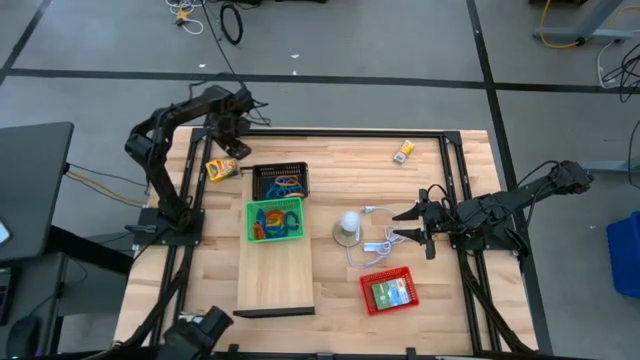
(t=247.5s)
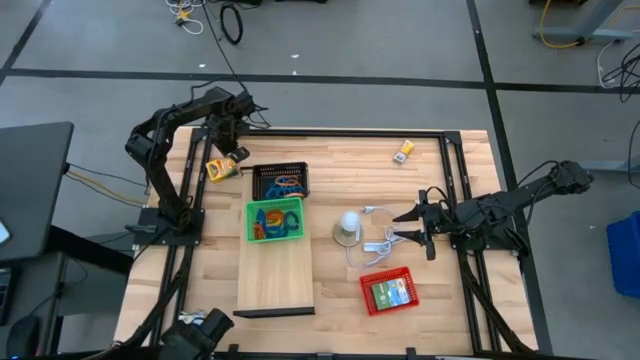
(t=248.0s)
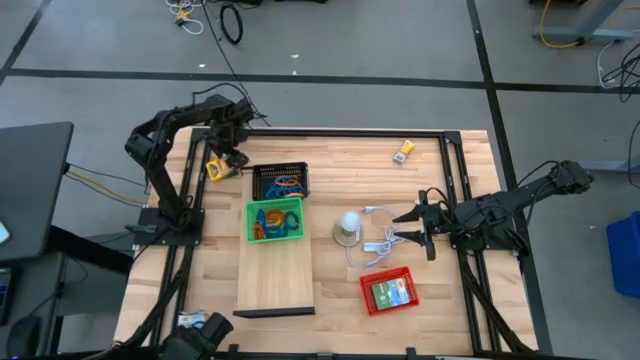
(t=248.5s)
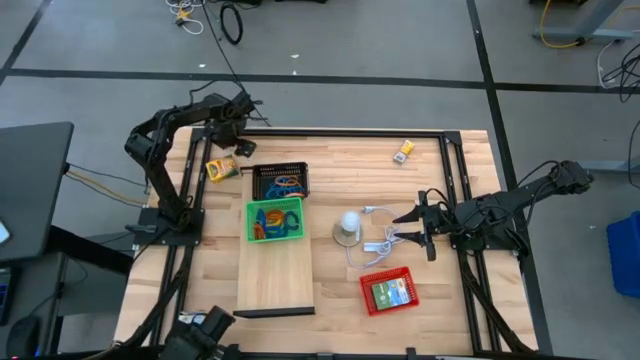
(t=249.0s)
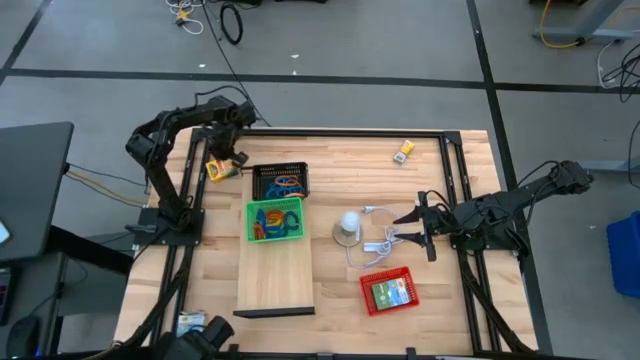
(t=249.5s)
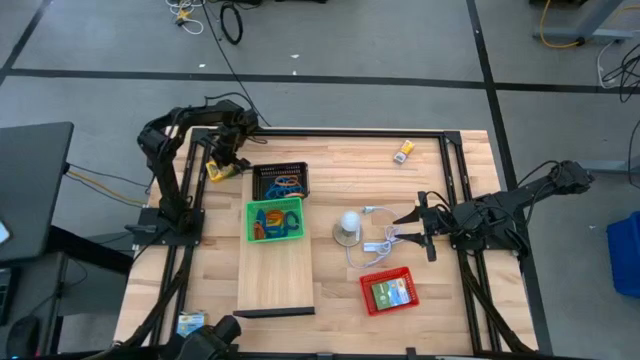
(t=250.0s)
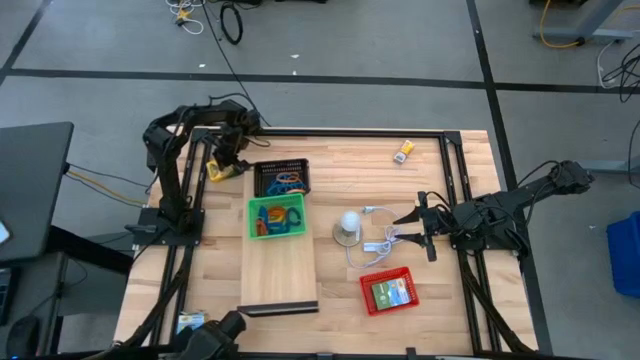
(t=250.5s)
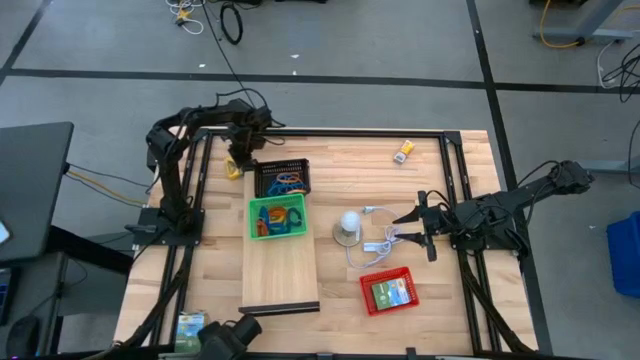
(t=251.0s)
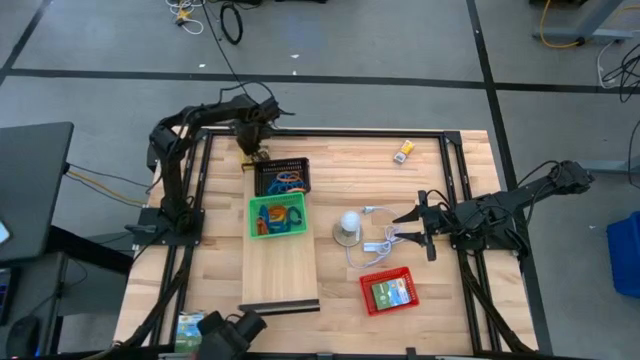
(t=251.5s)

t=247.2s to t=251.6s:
Task: Pick & Place Office Desk Supplies
Adjust the box of crayon

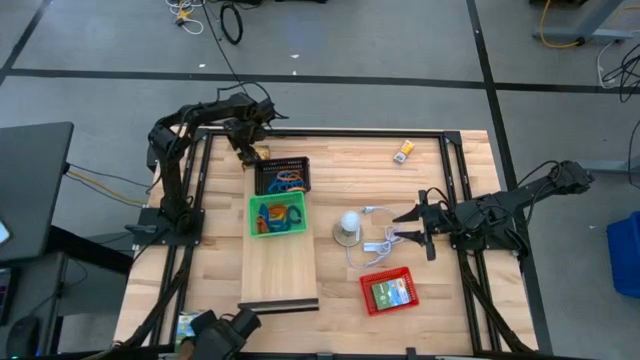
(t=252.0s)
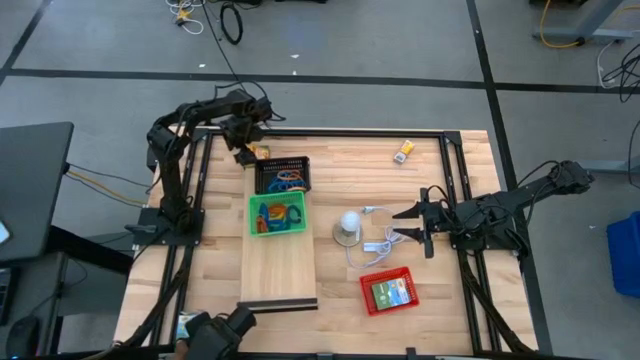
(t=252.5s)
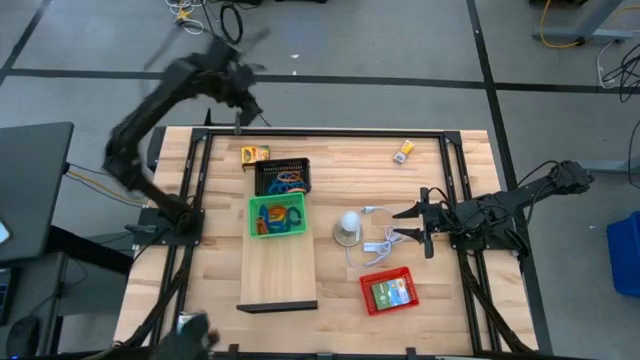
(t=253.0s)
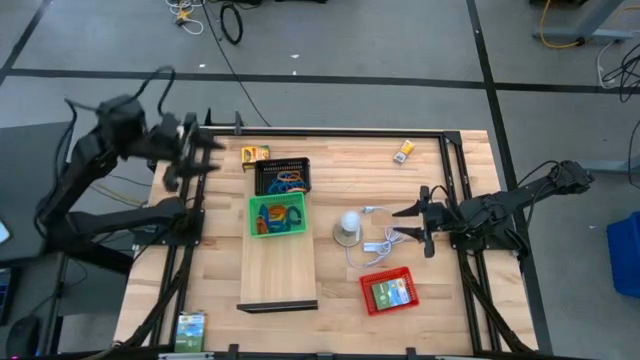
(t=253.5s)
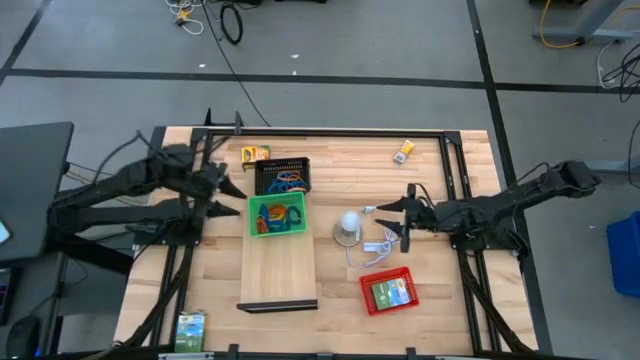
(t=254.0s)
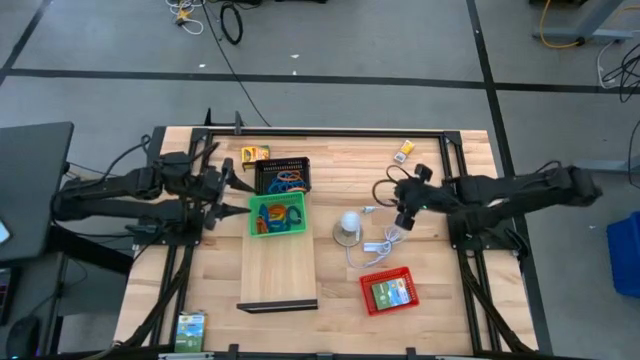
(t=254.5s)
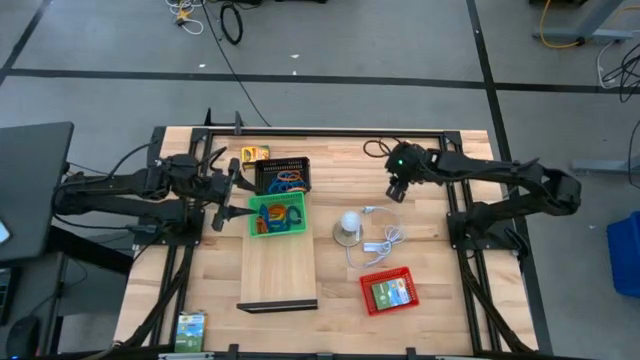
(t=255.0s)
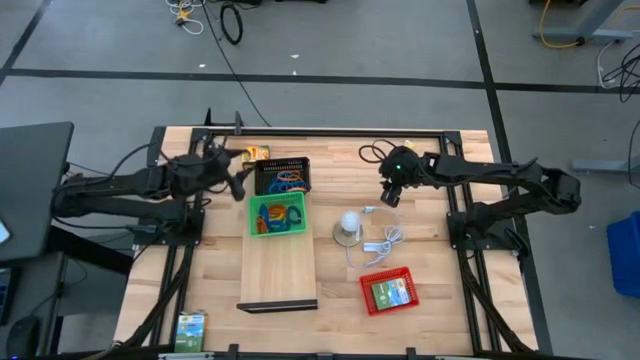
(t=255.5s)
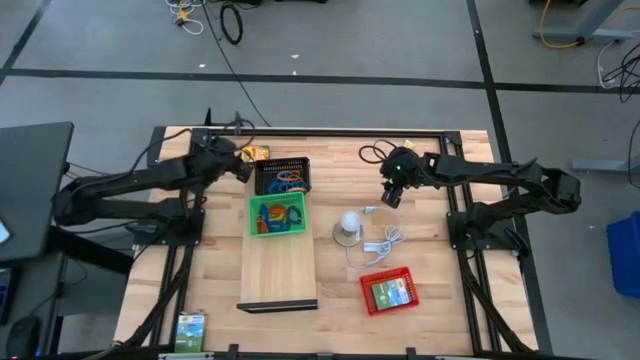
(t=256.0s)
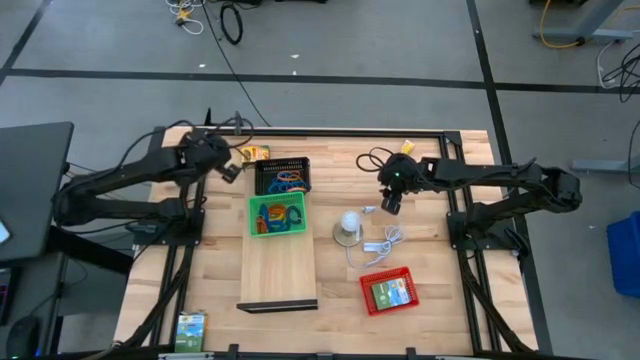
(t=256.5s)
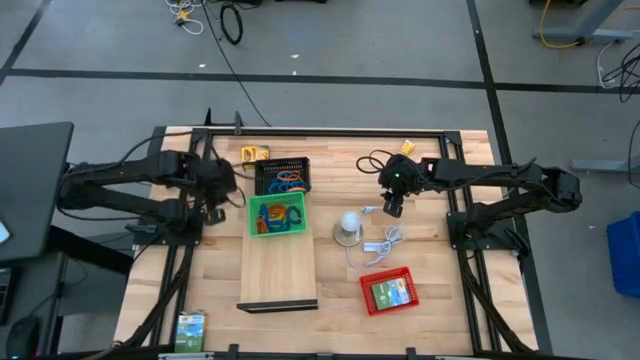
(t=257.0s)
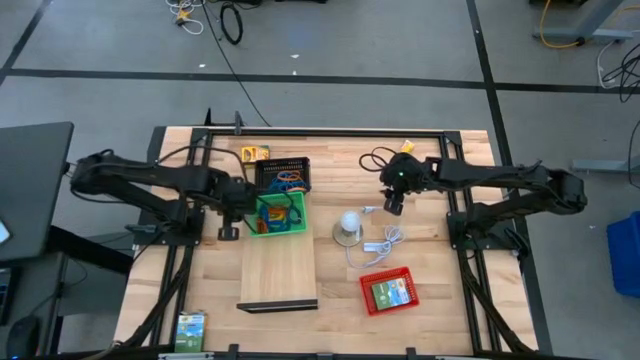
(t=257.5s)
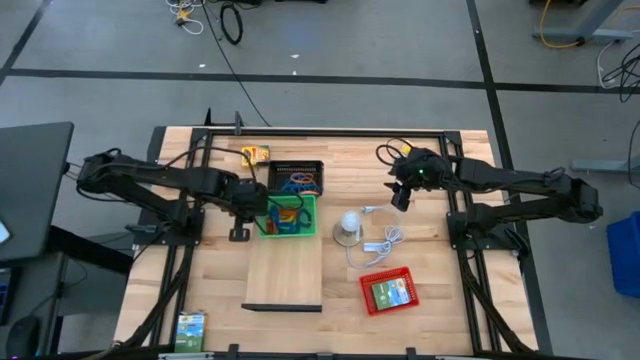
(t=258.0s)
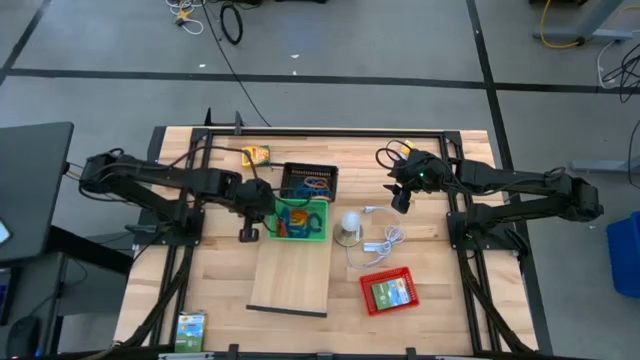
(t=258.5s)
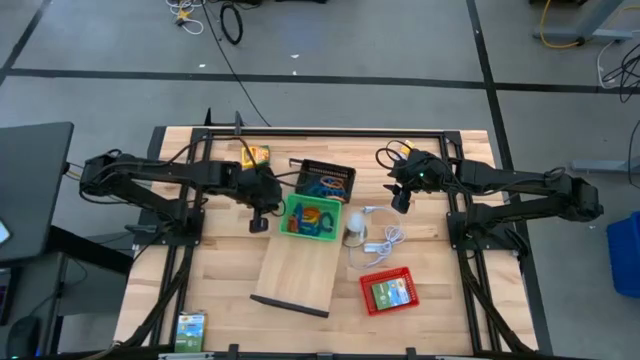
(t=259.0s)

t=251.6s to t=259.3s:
Adjust the shelf

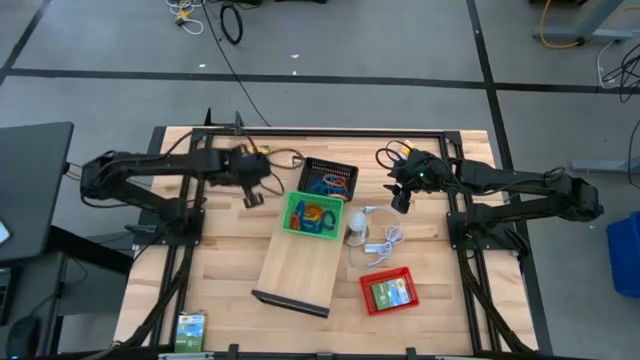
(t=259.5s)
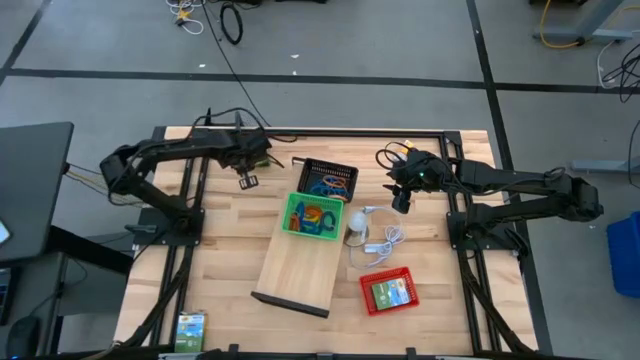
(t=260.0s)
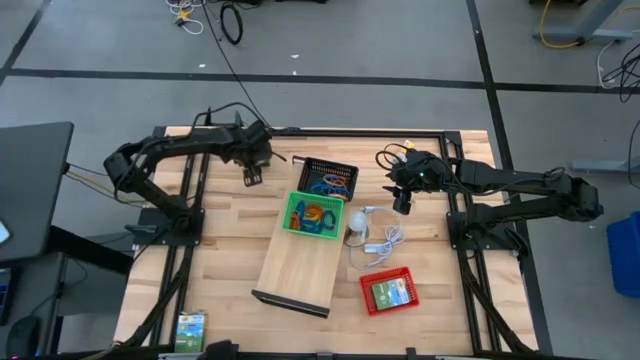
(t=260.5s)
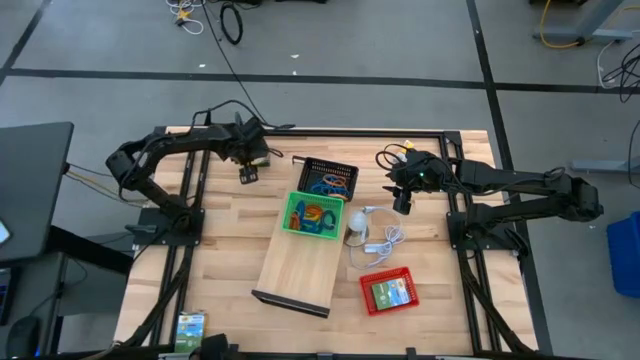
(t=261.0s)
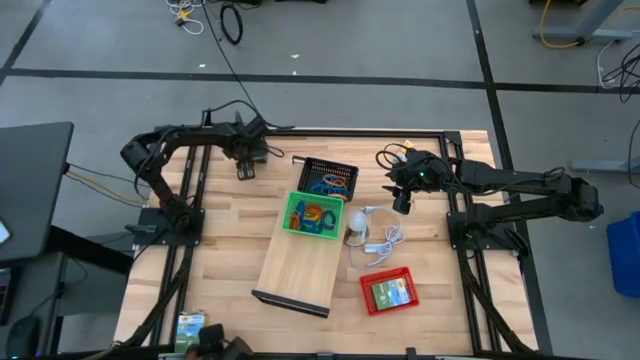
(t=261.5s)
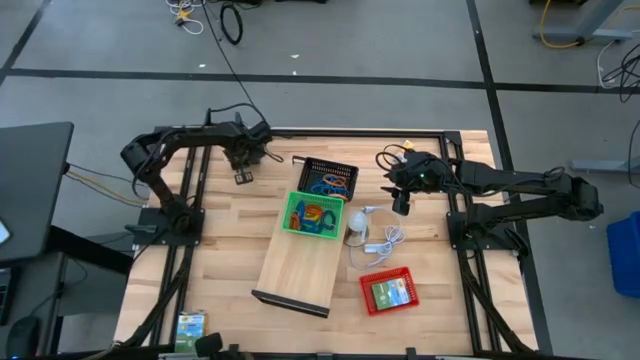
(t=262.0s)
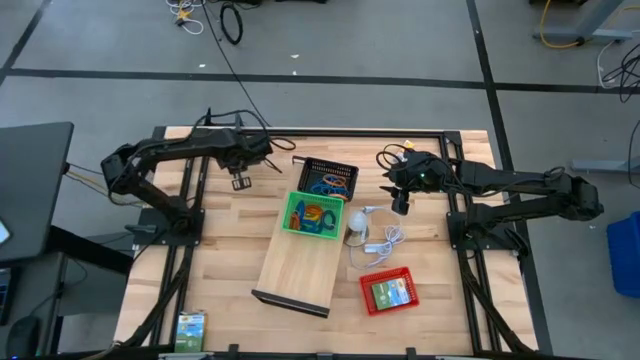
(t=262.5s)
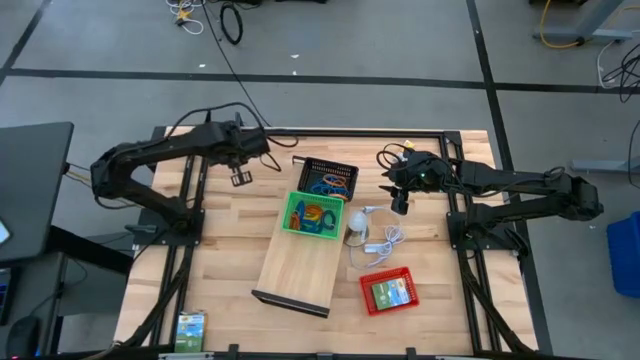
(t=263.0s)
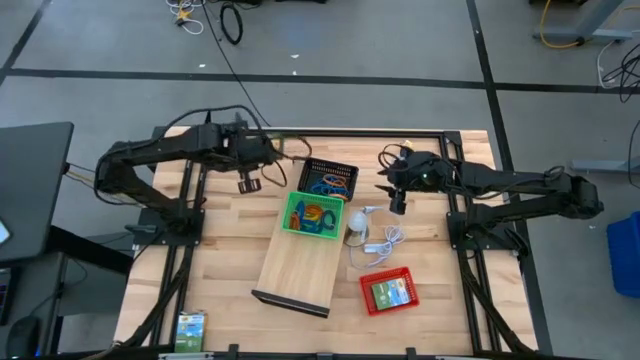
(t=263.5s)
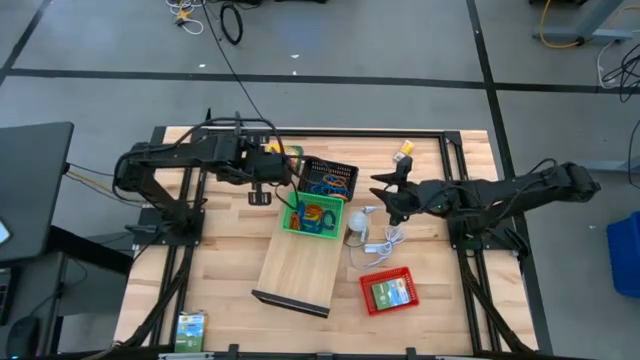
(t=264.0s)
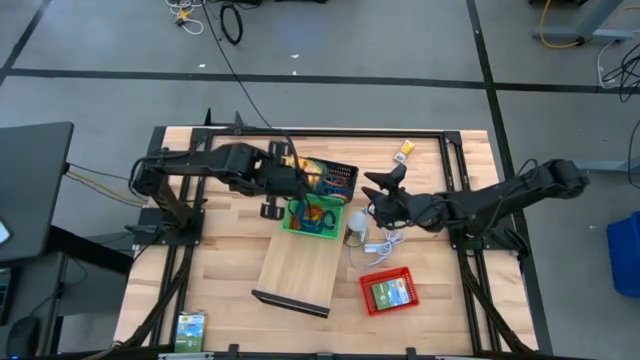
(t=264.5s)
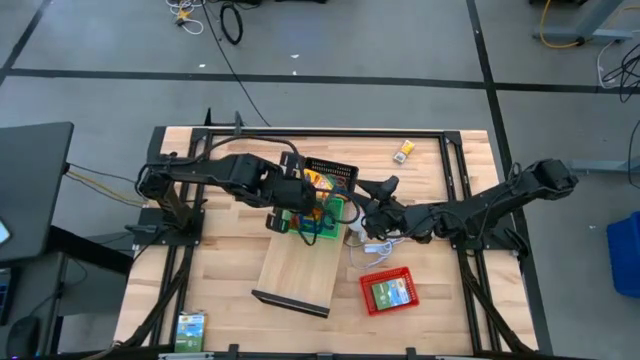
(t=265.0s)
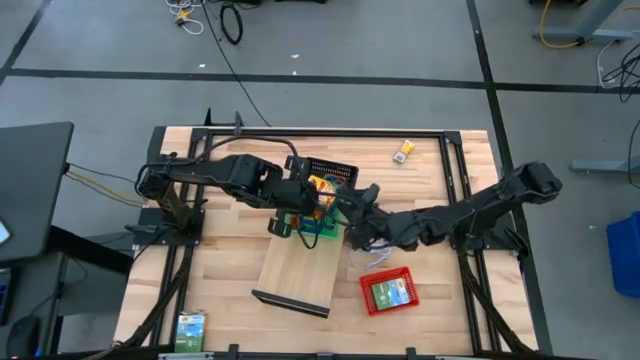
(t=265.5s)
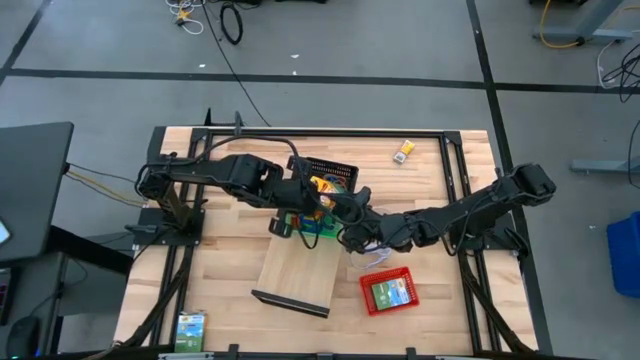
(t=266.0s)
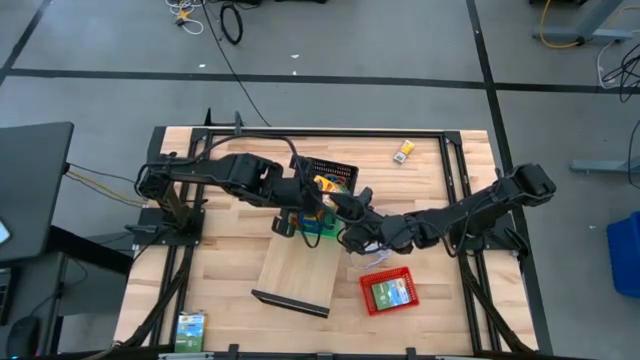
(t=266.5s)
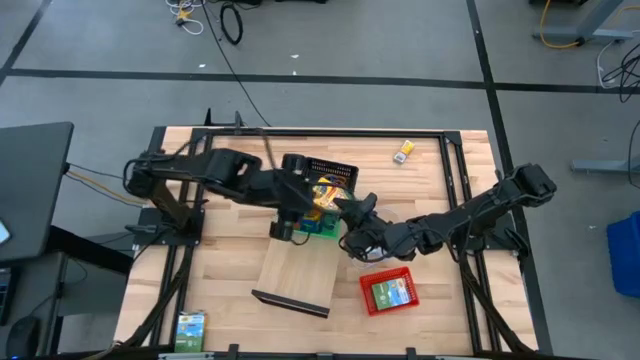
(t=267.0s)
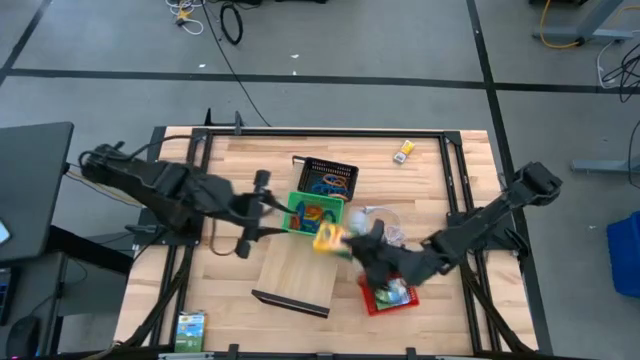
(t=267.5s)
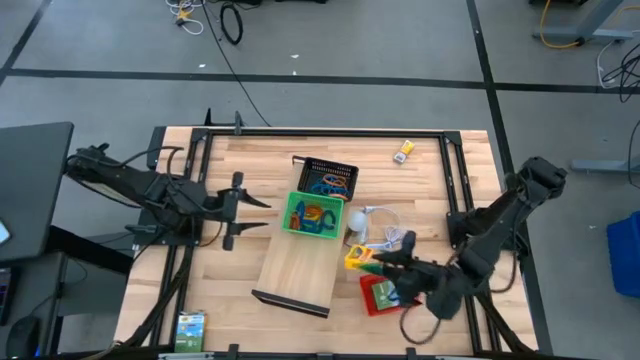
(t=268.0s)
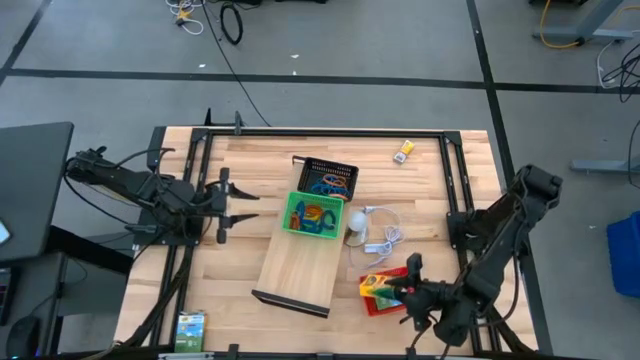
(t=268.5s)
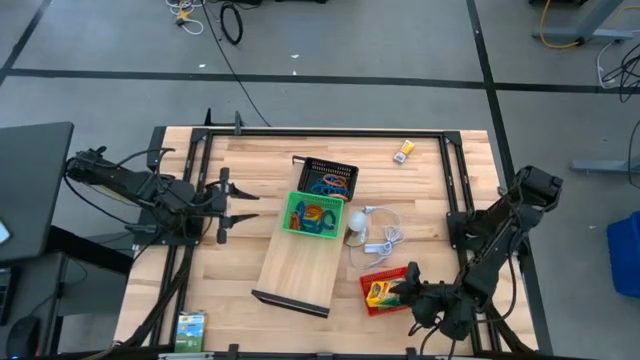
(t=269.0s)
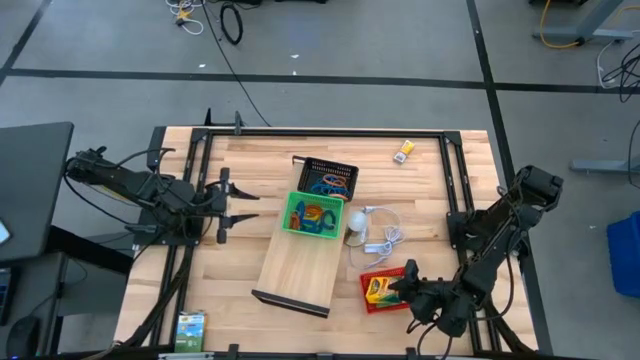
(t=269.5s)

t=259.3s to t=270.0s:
Put the box of crayon into the red bin
